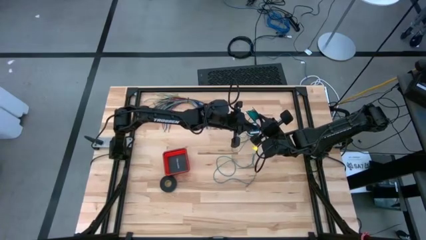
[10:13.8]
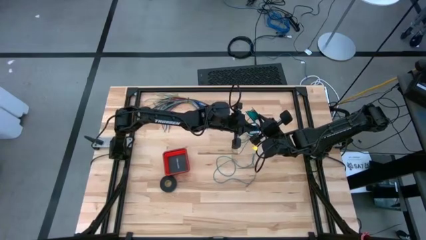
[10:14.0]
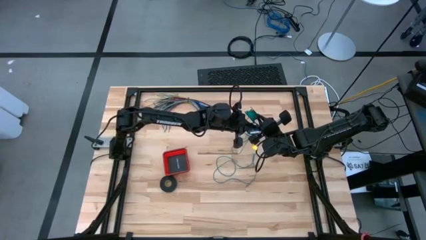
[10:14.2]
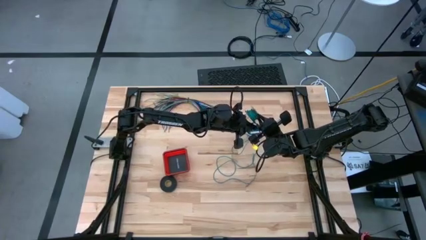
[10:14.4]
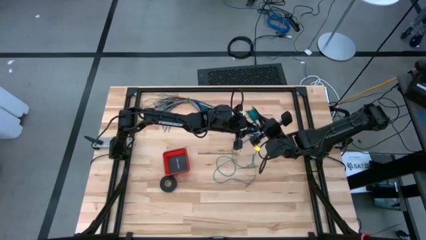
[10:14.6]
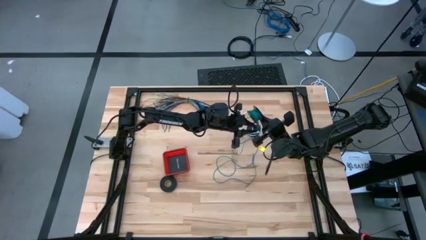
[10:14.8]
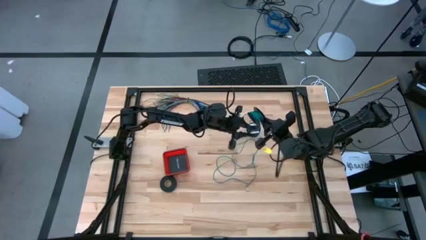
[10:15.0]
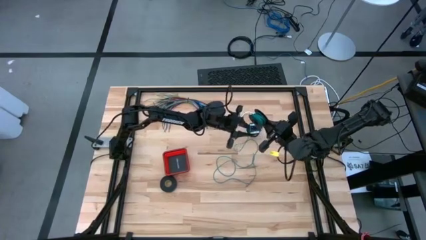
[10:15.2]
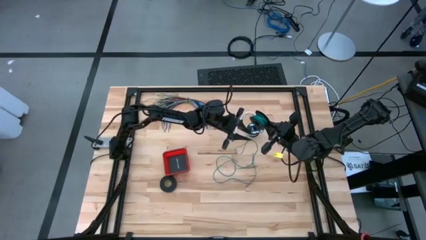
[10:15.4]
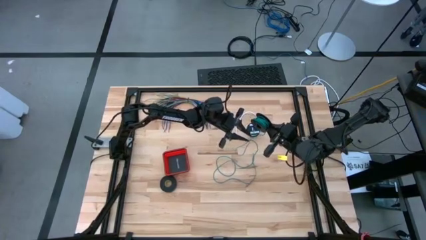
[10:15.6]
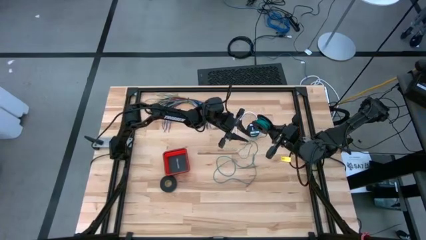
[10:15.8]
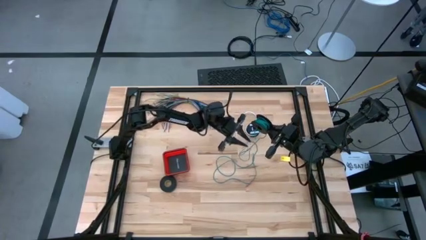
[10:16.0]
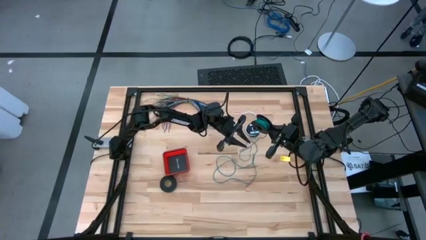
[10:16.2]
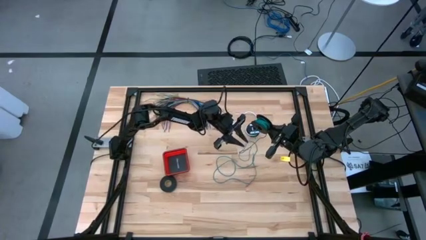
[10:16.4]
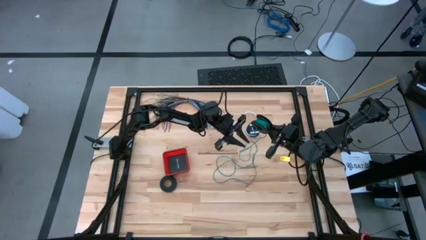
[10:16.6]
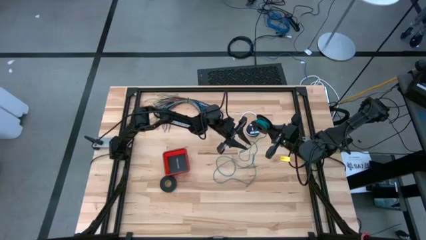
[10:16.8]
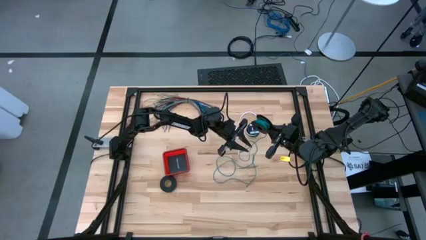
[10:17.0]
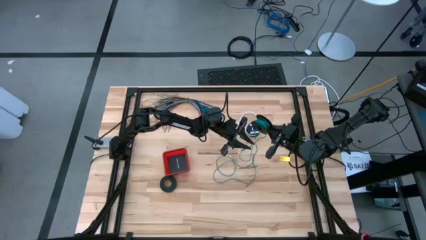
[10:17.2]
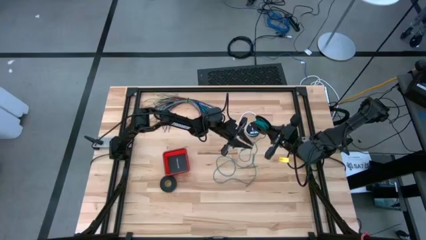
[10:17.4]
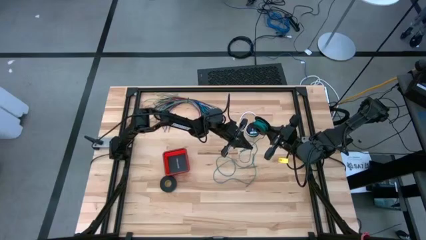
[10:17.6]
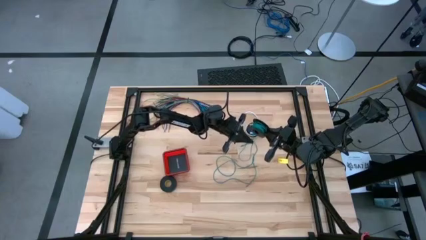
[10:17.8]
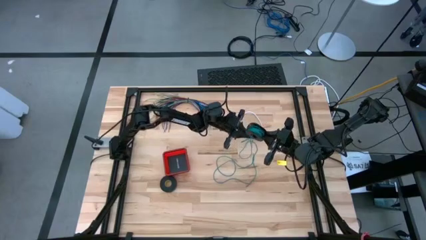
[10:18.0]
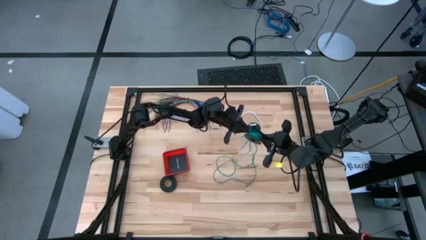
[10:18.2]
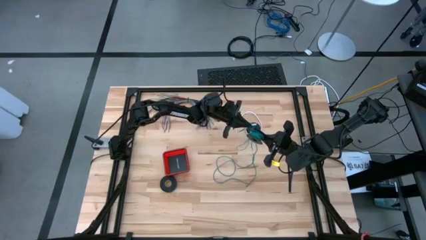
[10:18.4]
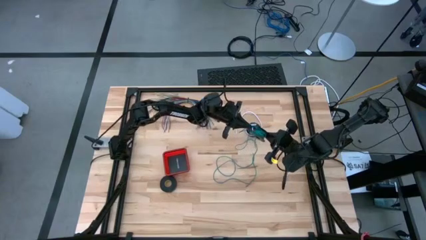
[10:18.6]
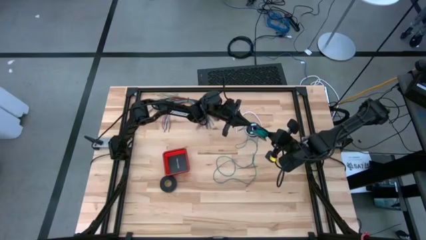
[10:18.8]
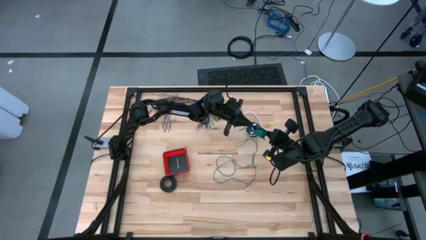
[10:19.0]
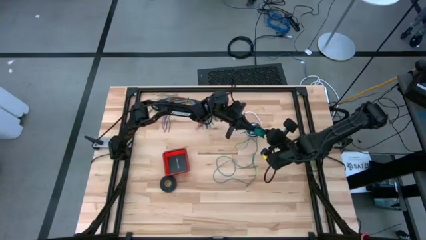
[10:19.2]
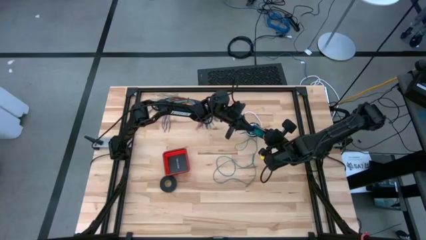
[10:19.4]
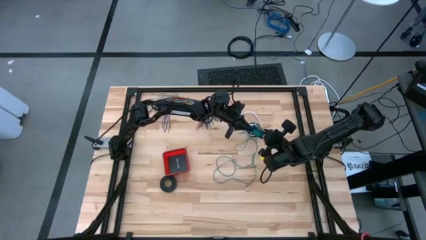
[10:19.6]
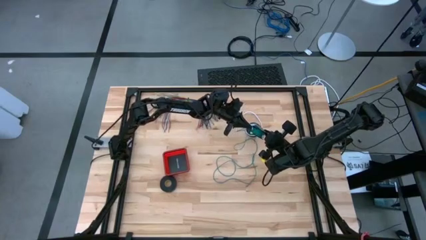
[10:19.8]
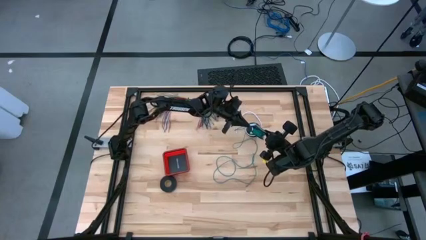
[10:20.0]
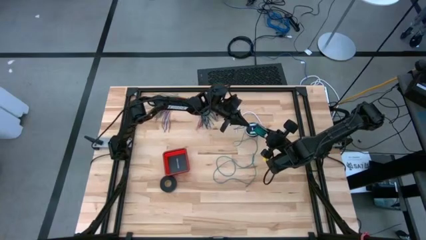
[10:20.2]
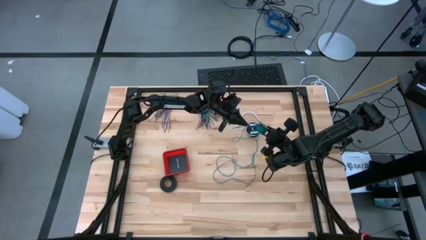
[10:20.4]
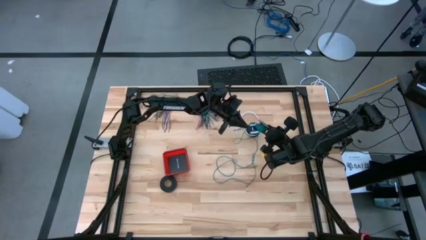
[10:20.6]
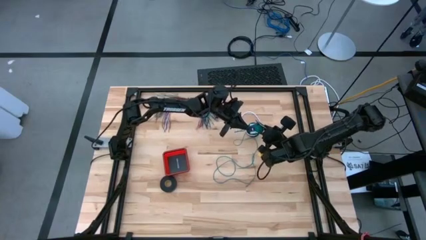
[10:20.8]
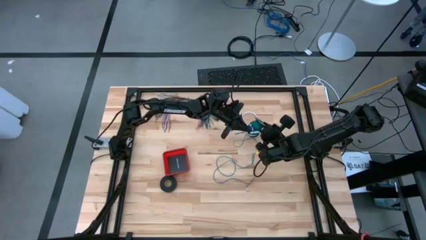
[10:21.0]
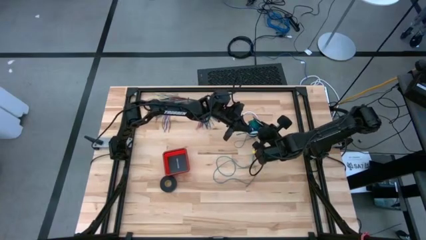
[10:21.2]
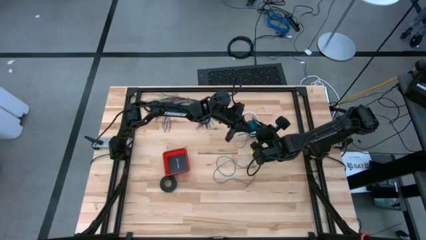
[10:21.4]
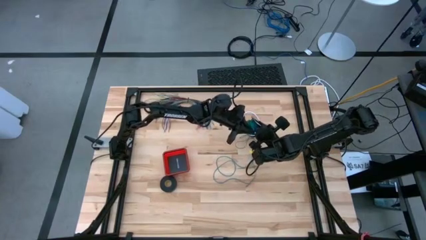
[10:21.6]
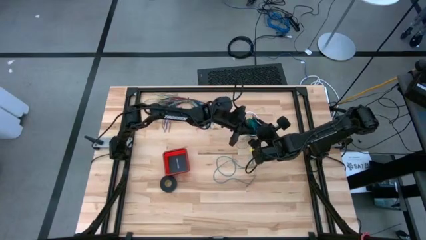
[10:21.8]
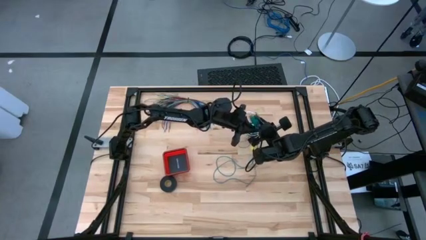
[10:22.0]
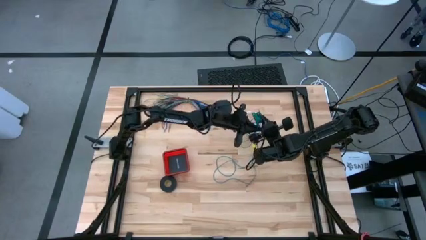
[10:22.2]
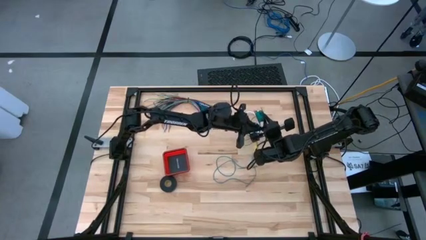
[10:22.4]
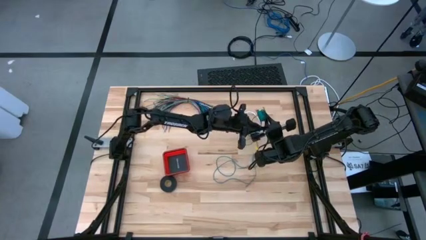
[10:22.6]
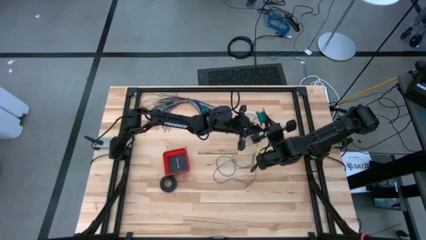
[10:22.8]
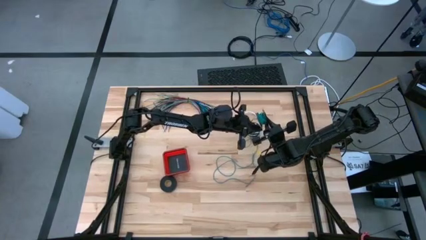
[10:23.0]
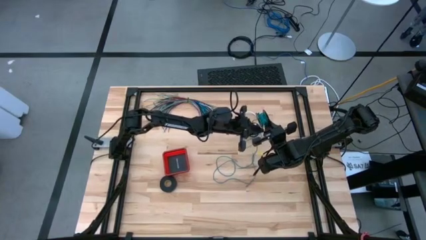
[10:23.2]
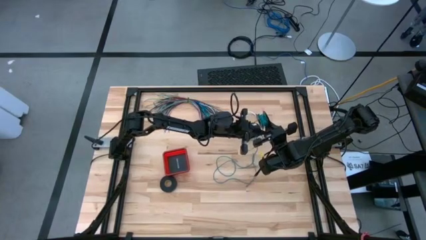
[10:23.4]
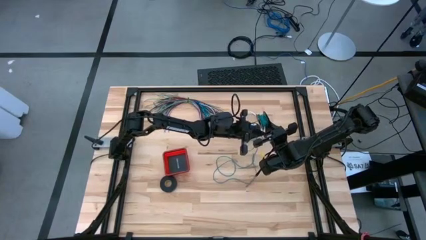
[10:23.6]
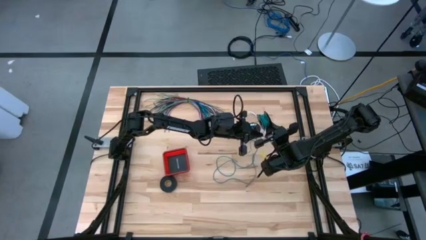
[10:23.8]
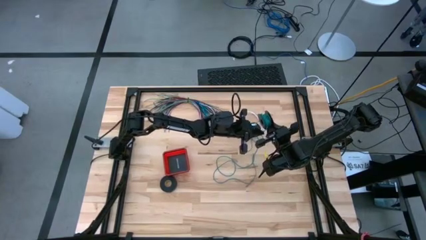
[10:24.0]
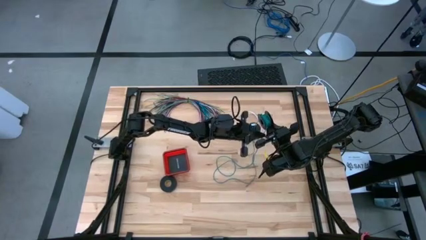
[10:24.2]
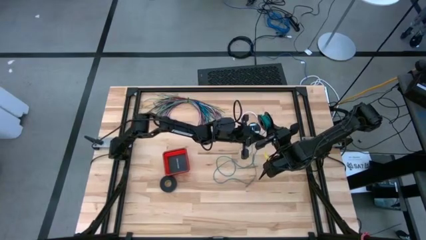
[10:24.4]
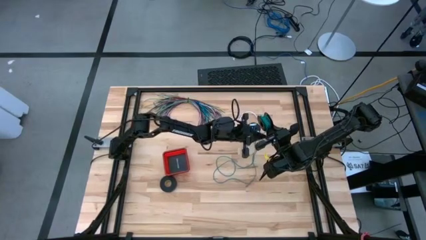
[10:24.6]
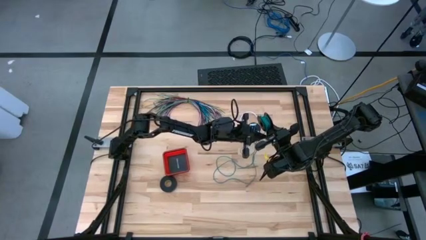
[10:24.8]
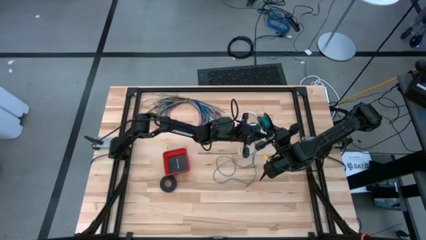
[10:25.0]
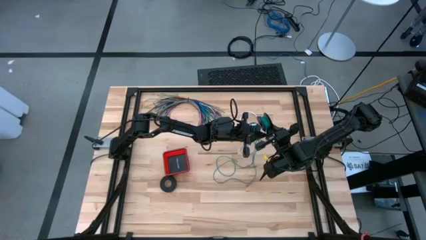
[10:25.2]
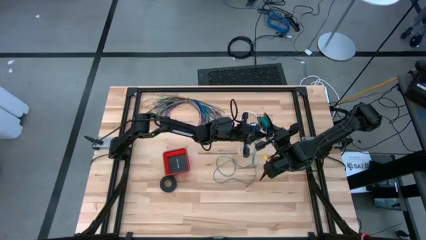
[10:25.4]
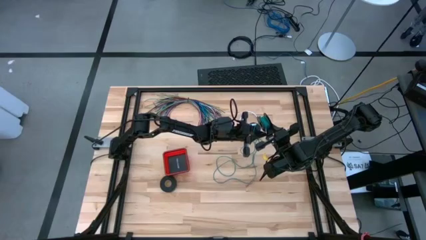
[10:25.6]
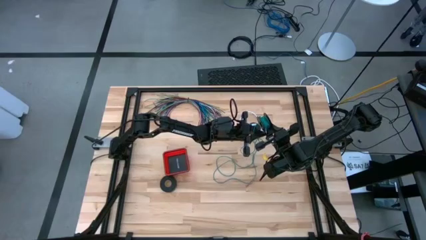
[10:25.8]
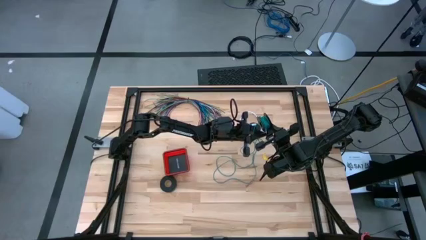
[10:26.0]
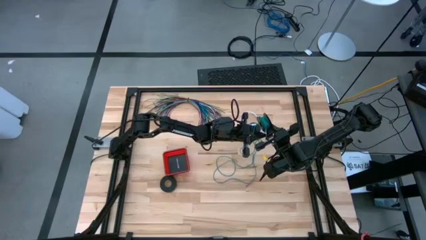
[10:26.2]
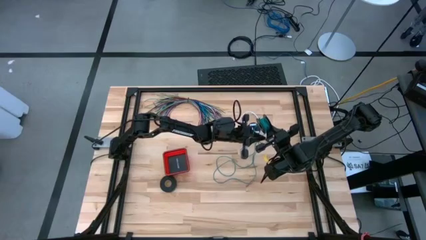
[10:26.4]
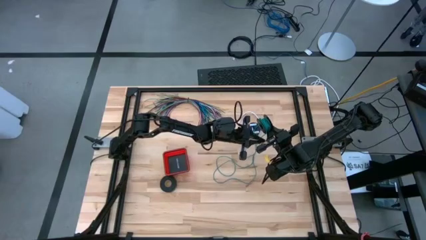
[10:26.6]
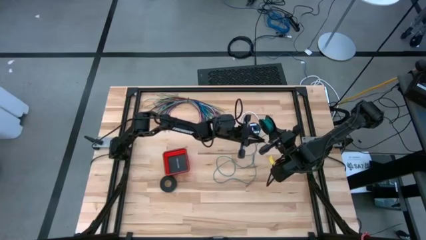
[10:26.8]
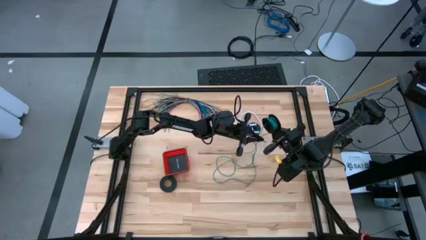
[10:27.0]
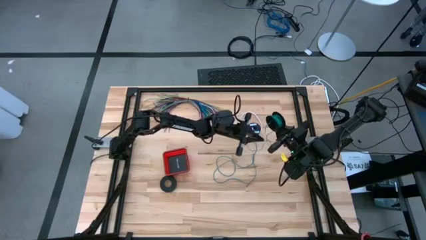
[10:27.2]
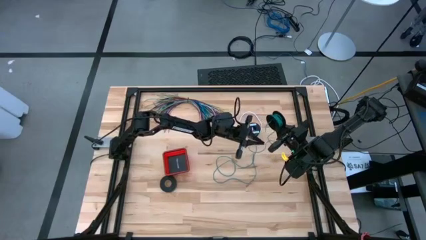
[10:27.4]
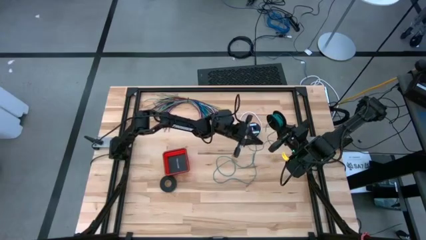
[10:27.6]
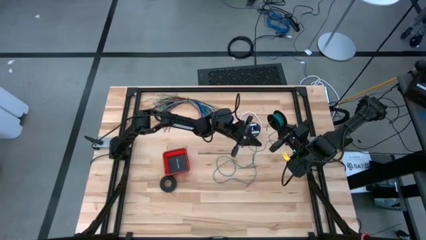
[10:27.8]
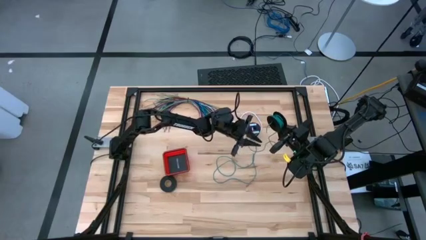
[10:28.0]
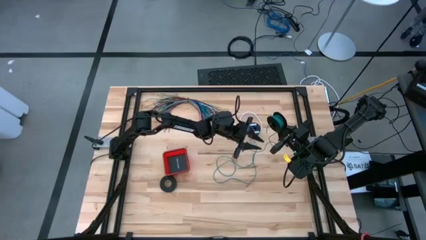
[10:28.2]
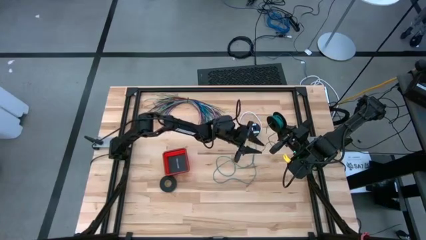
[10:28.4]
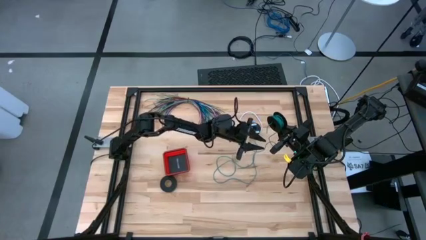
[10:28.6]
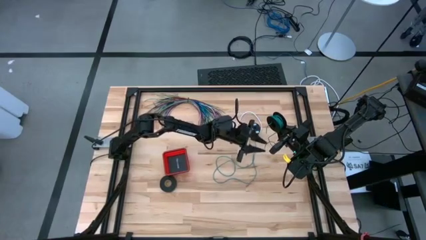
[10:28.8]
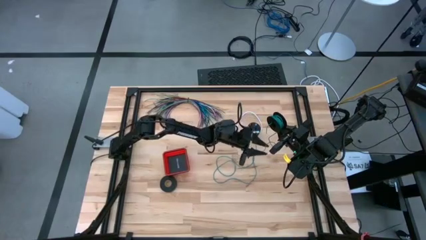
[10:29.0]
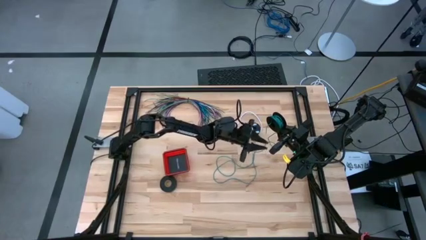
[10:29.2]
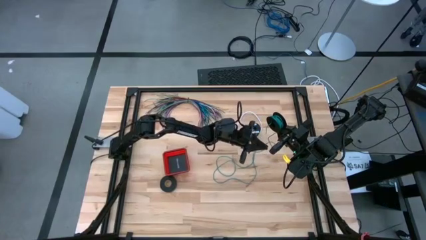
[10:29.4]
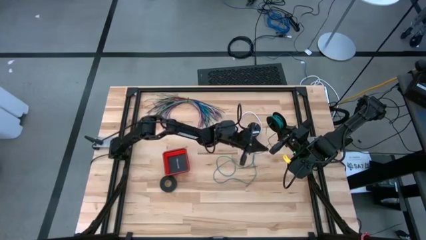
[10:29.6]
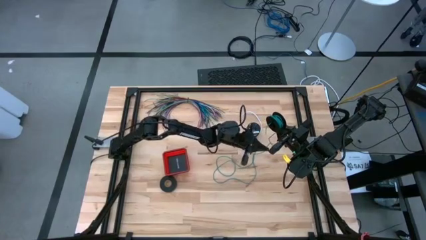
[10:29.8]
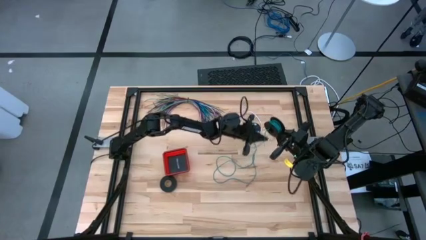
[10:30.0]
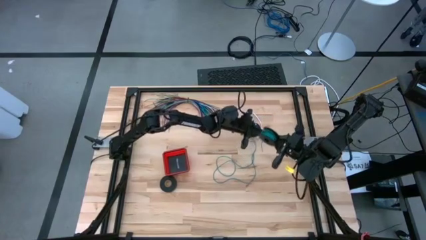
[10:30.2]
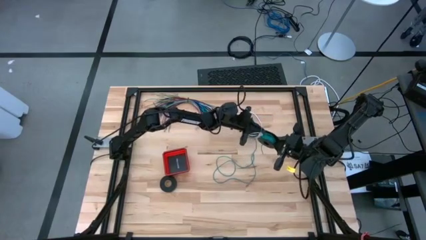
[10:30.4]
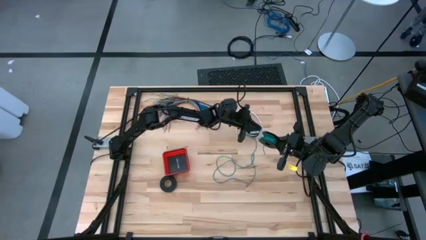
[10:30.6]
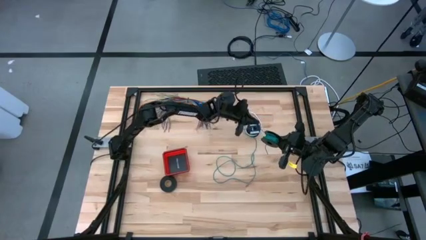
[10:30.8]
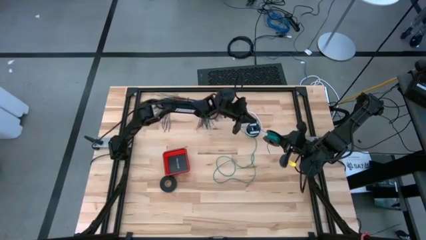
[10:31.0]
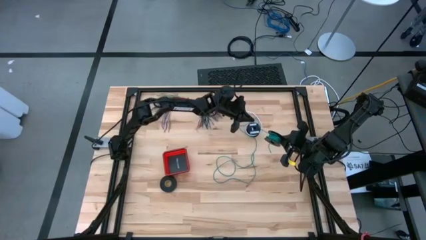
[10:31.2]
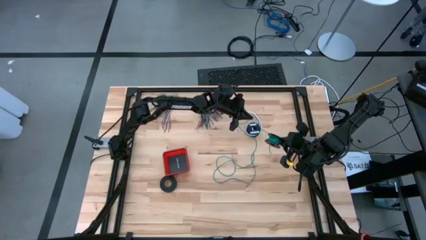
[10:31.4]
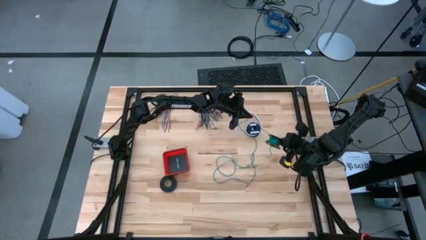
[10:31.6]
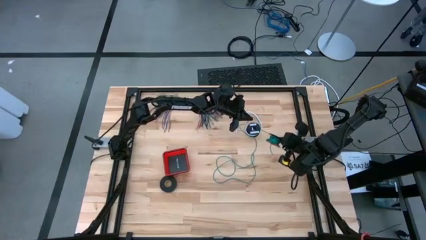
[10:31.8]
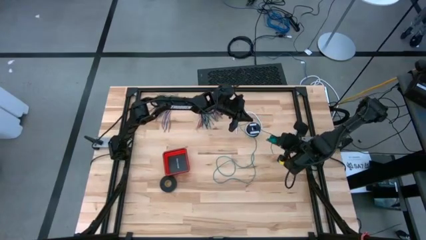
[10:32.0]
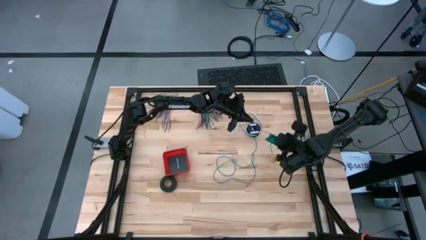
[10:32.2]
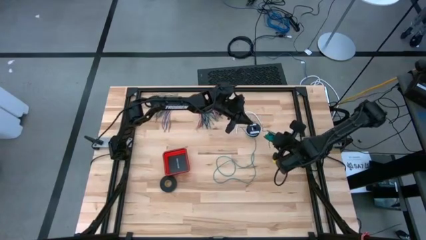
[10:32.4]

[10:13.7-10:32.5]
Task: Coil cords
Coil the green wire onto the spool
